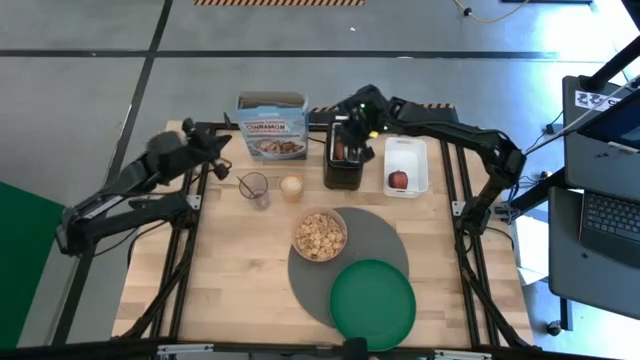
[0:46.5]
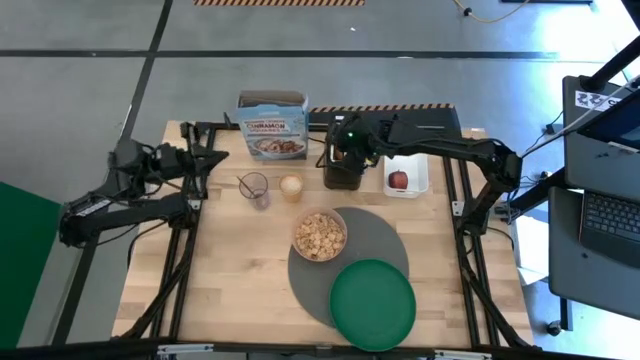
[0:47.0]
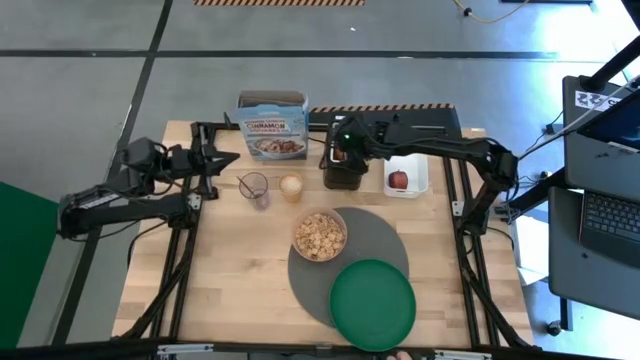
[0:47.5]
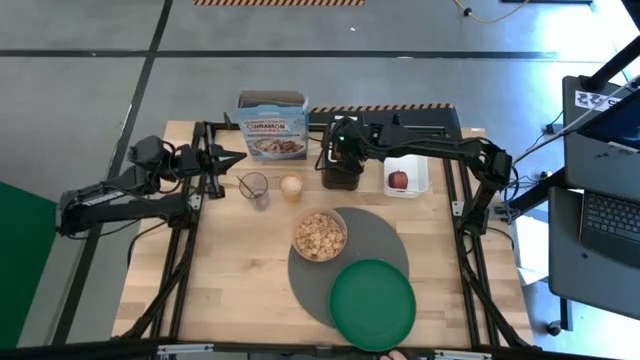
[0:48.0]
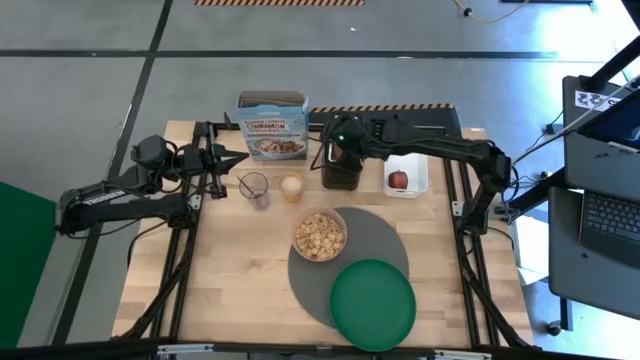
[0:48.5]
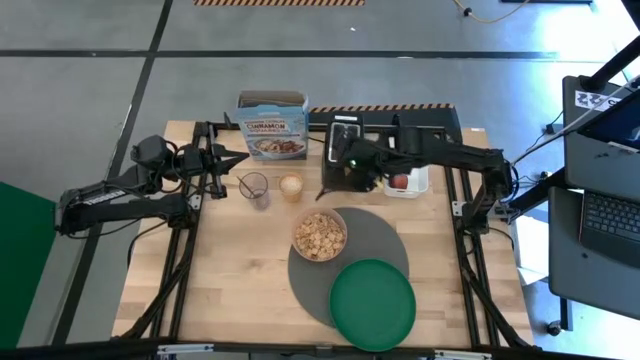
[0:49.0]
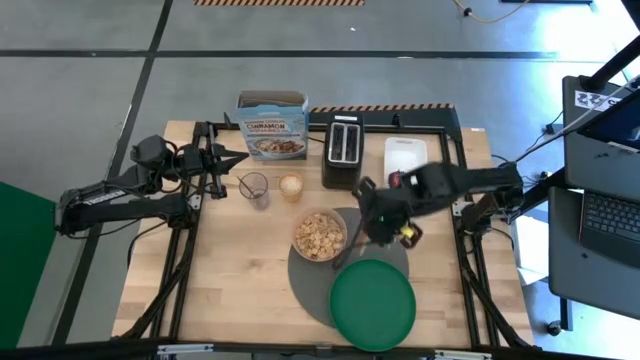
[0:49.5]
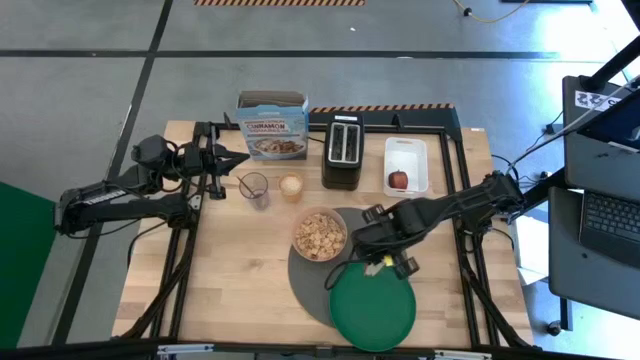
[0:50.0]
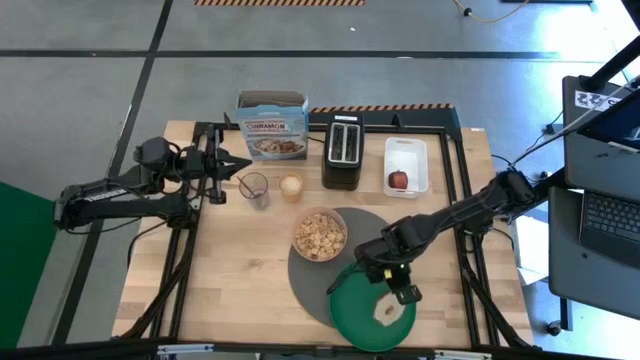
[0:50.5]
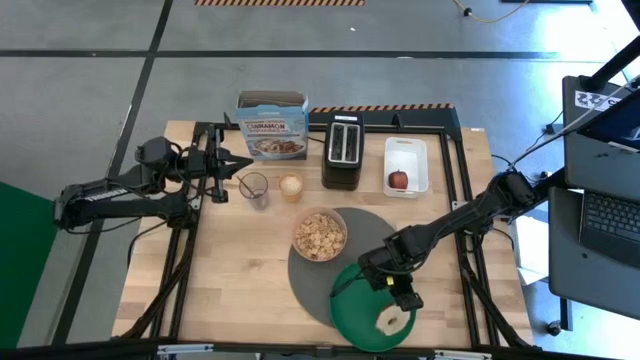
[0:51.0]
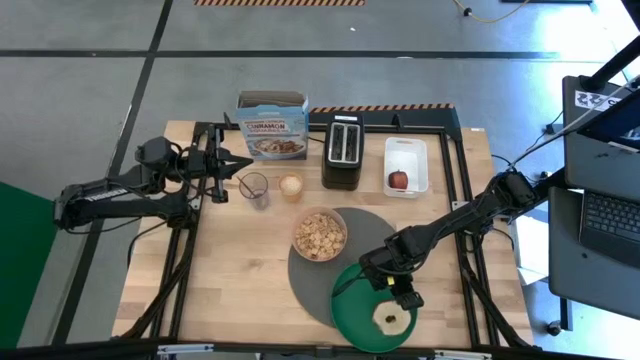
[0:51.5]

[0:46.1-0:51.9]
Task: Arrange a breakfast setting
Put the toasted bread on the green plate

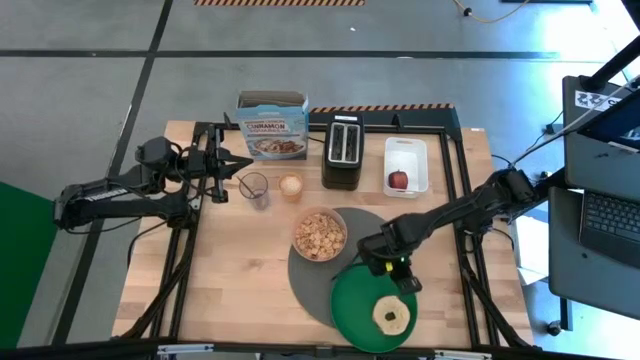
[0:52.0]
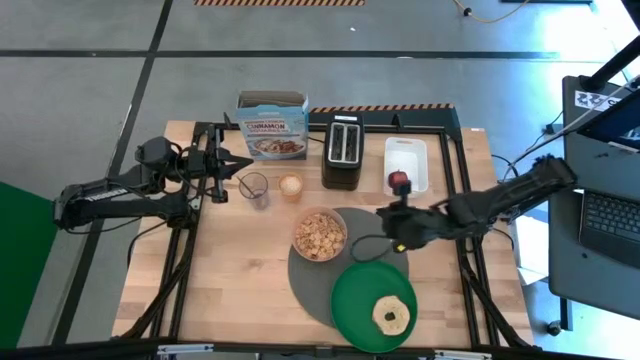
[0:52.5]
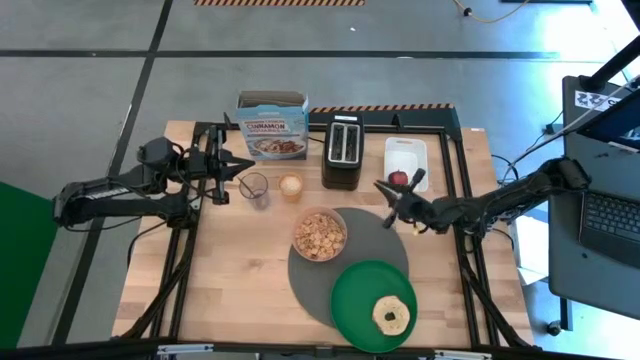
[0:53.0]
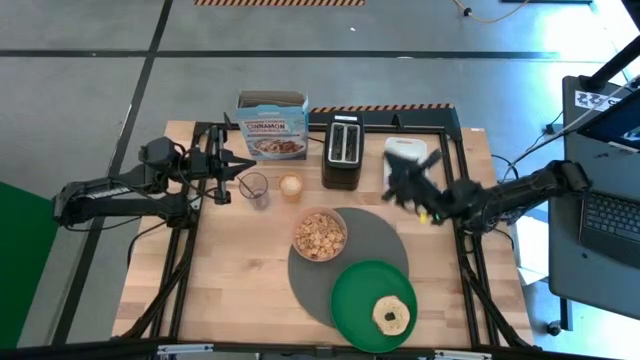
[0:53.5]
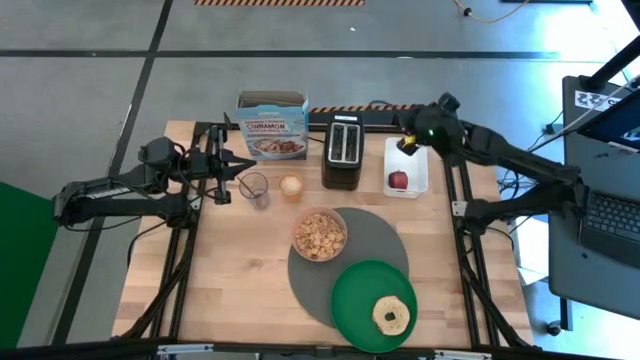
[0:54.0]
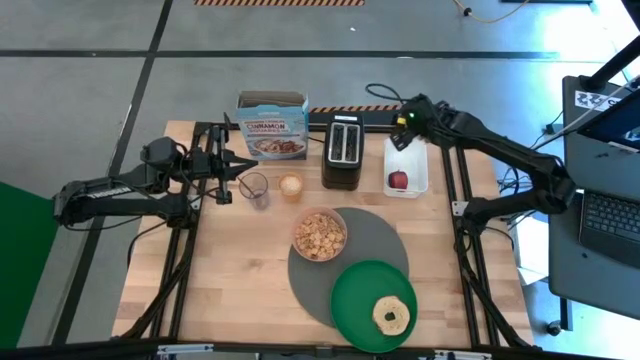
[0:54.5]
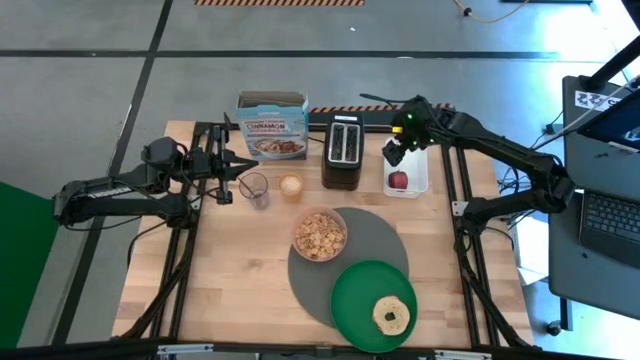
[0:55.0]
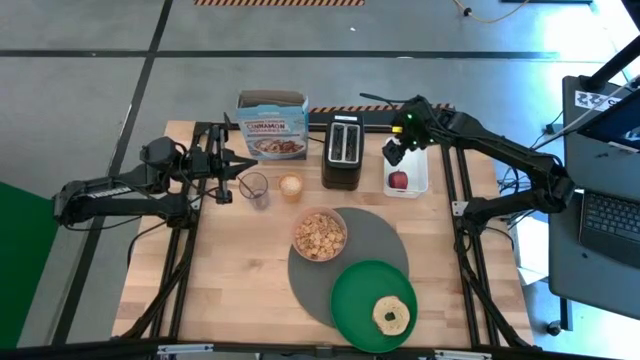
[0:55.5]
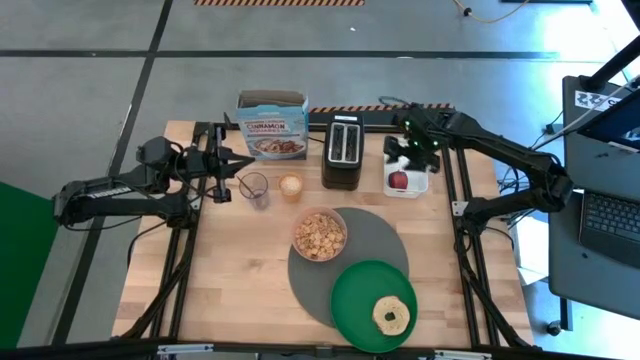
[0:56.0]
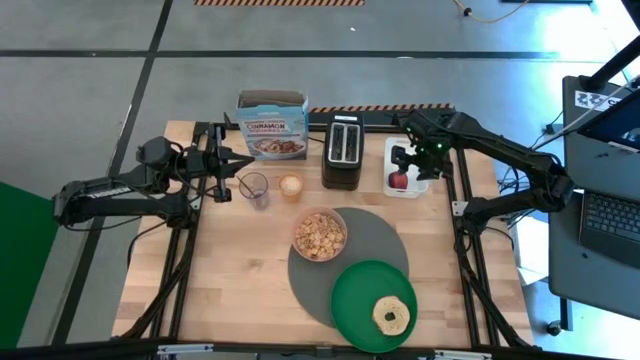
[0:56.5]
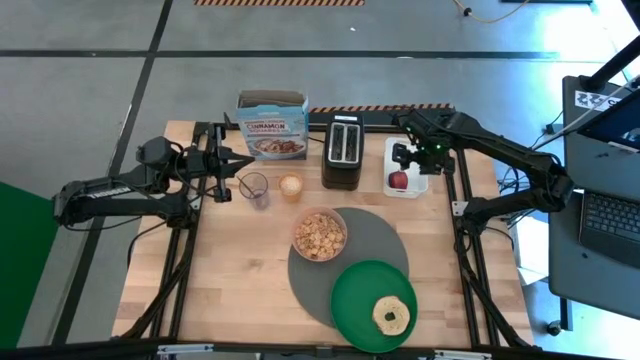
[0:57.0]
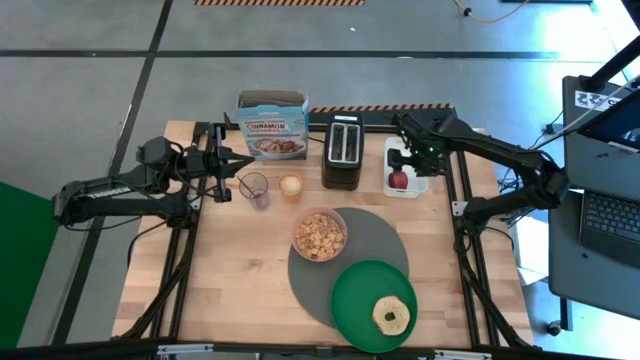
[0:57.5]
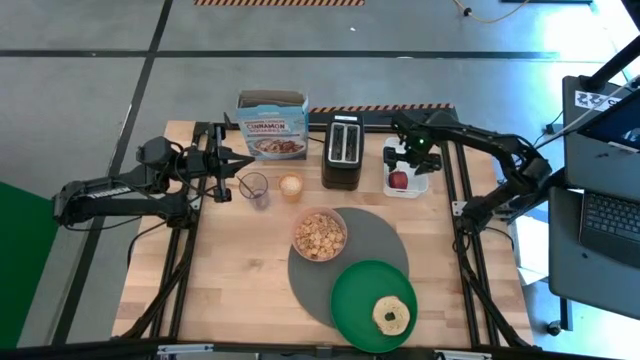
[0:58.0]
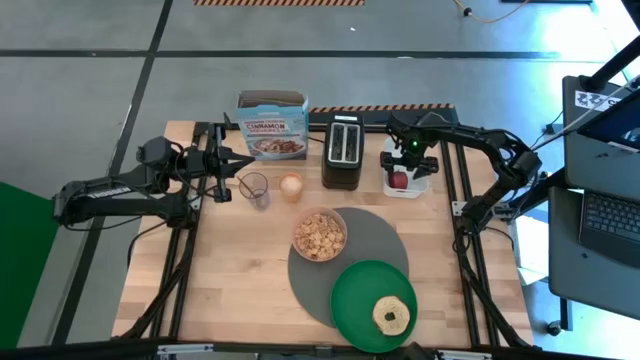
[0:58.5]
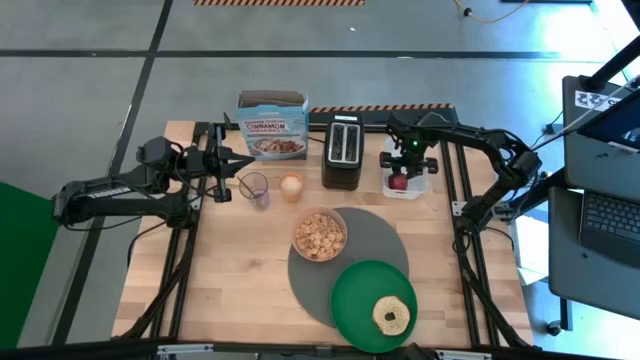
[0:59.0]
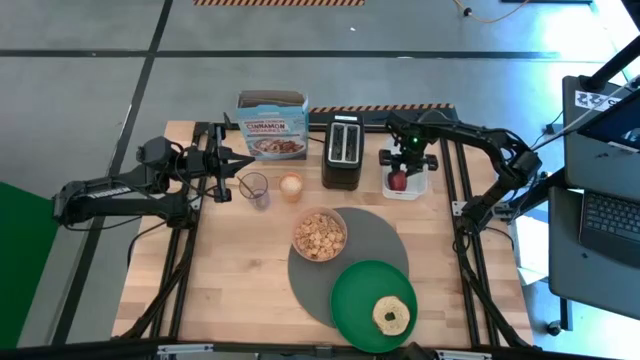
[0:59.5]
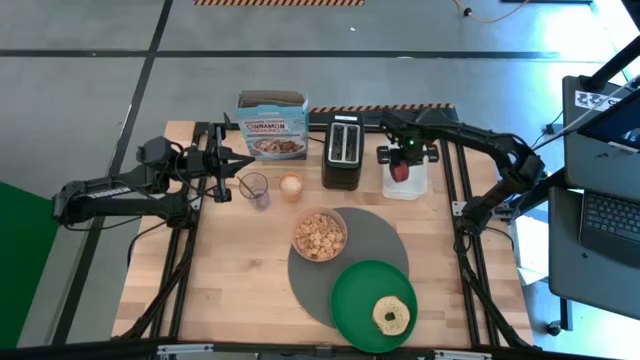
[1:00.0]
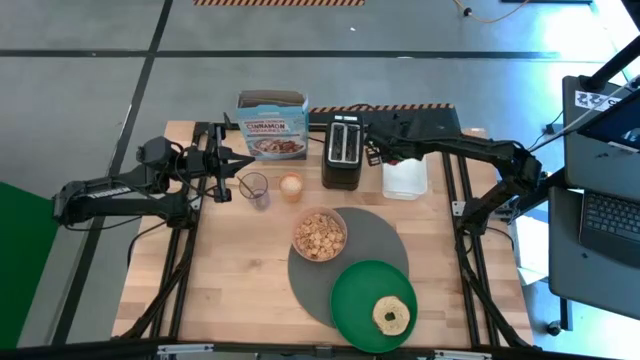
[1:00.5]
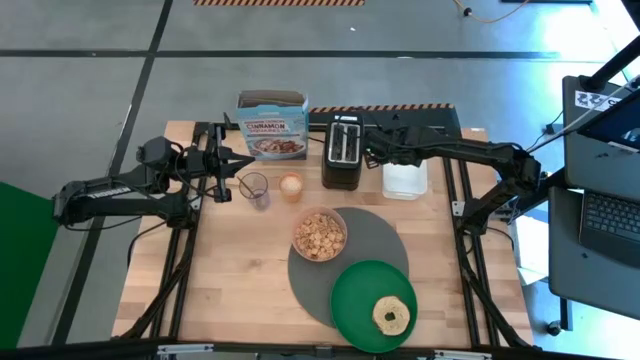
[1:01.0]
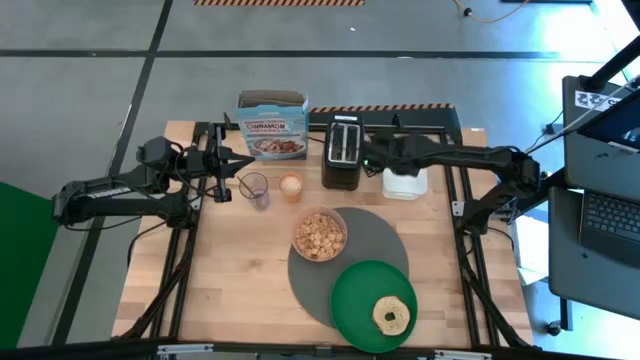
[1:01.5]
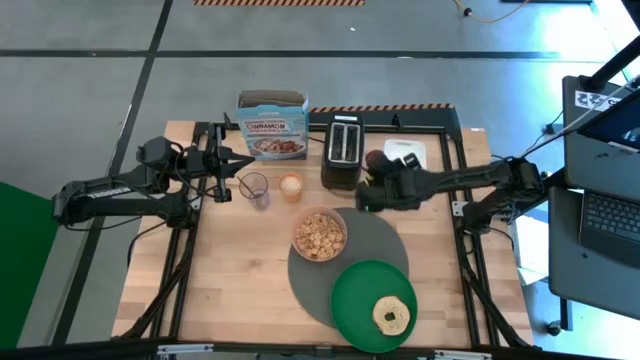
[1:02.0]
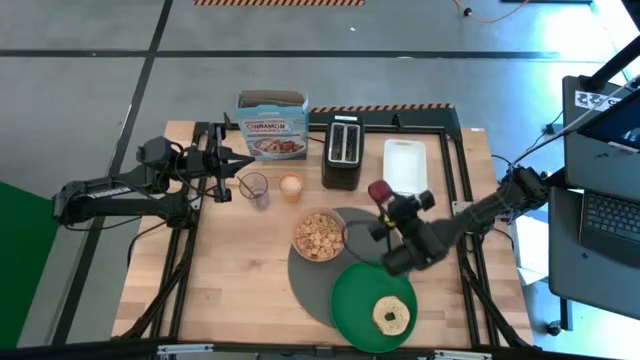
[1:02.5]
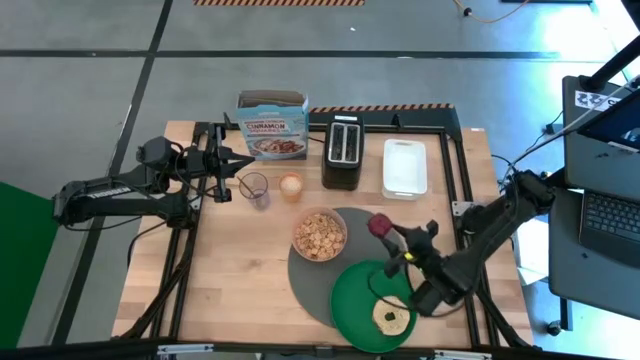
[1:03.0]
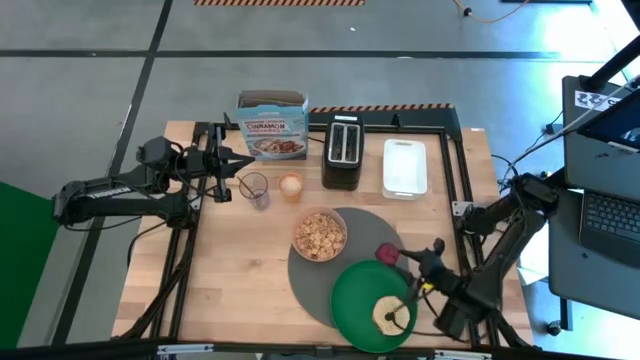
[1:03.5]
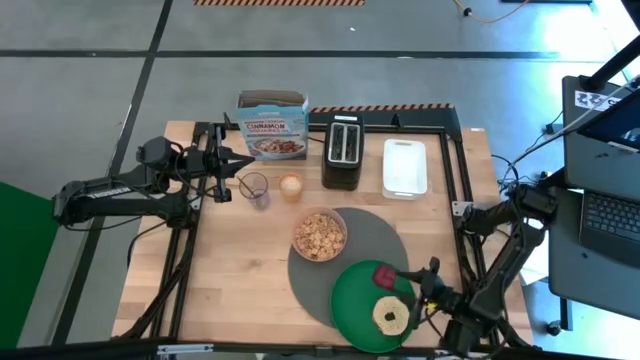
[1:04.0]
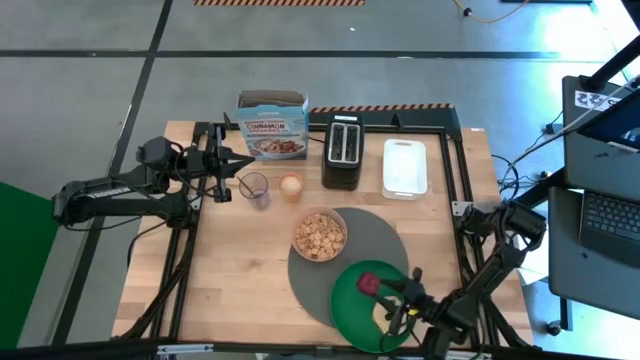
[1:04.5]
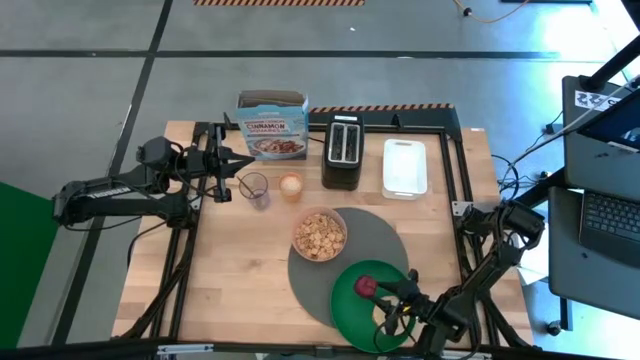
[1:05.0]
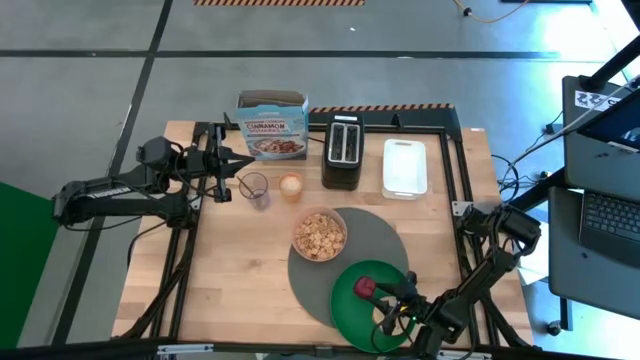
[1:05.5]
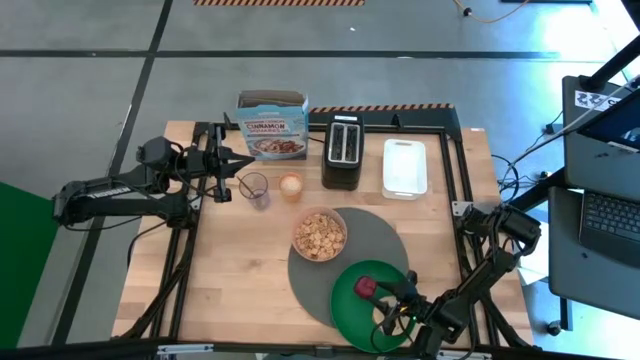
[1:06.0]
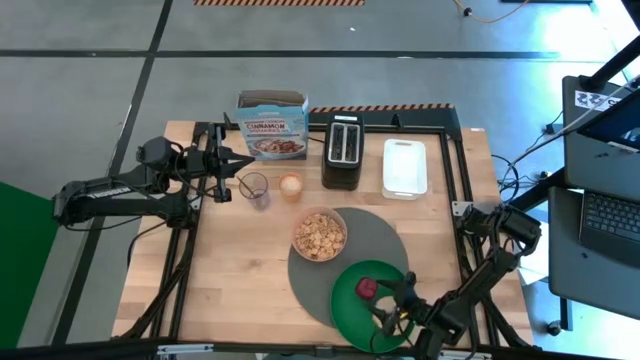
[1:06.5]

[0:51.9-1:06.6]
Put the red apple on the green plate
